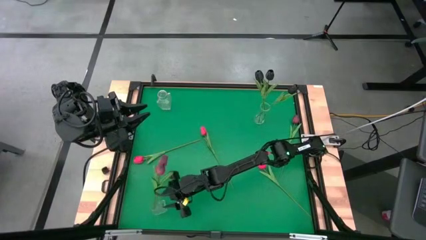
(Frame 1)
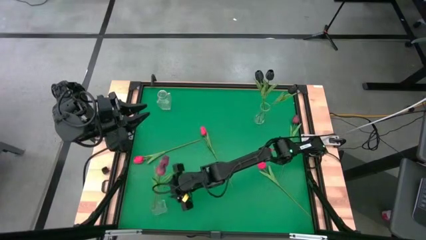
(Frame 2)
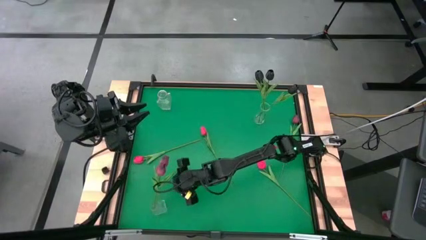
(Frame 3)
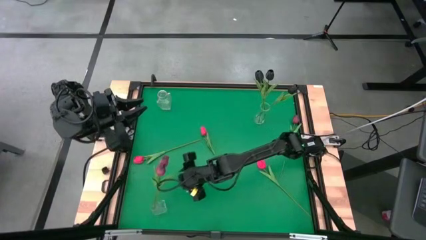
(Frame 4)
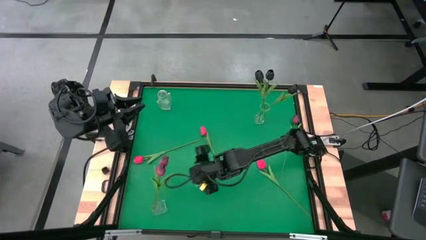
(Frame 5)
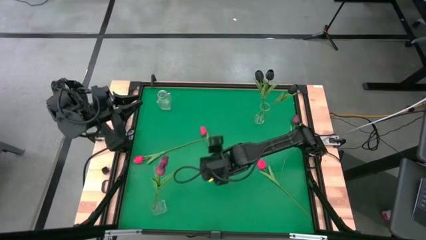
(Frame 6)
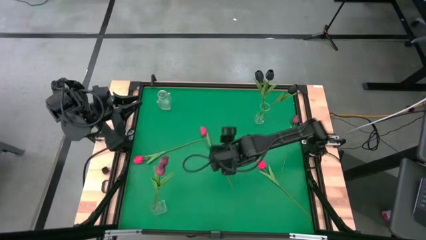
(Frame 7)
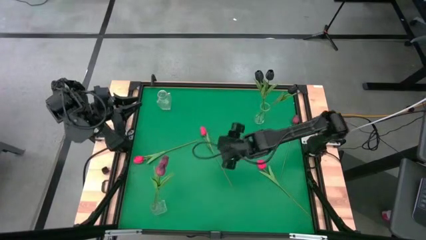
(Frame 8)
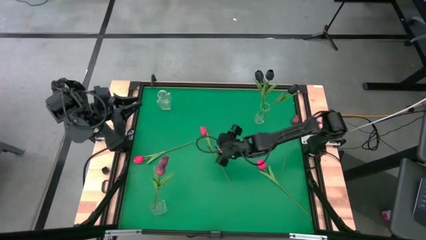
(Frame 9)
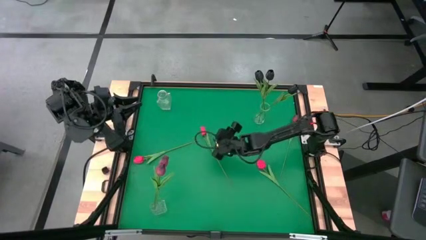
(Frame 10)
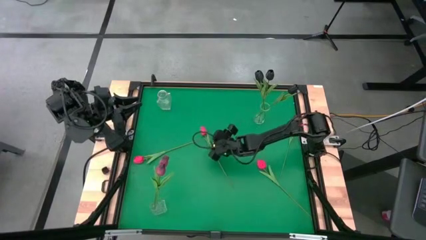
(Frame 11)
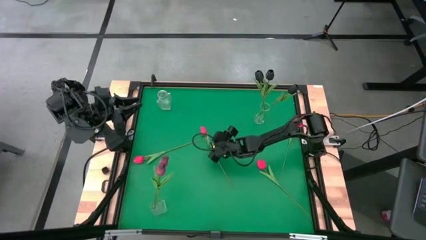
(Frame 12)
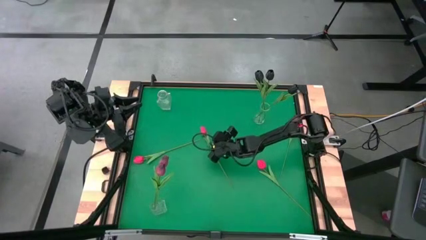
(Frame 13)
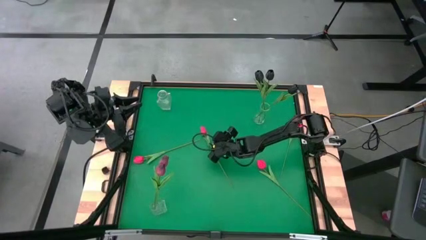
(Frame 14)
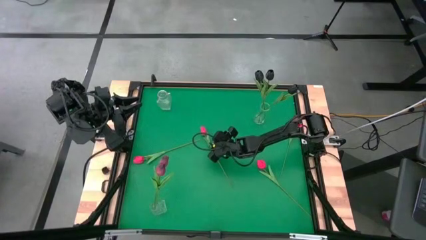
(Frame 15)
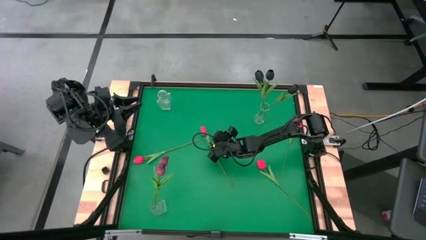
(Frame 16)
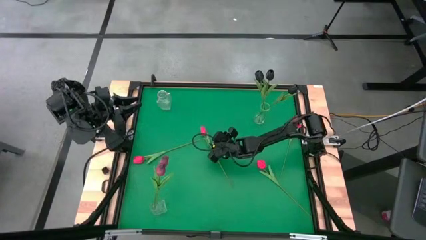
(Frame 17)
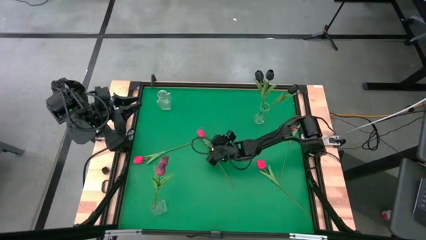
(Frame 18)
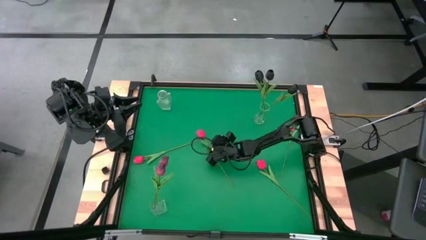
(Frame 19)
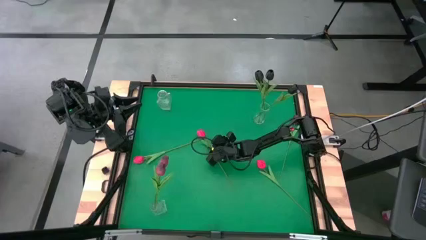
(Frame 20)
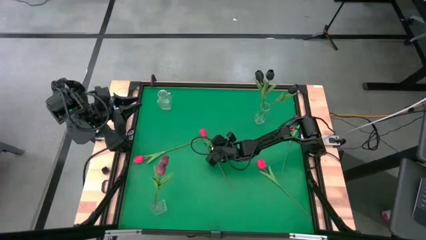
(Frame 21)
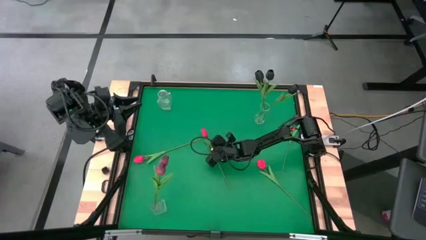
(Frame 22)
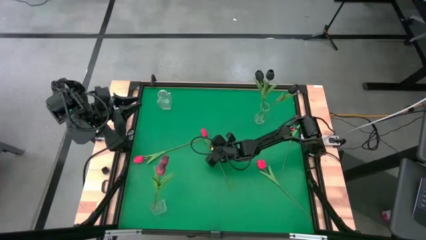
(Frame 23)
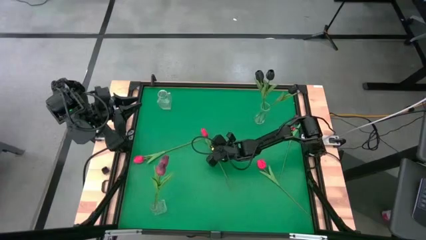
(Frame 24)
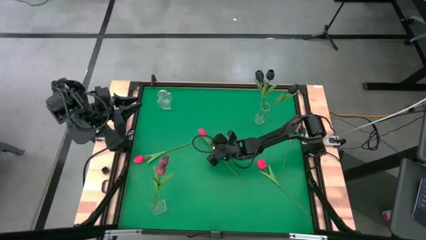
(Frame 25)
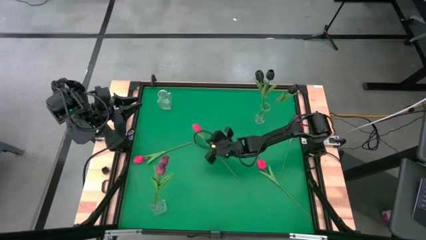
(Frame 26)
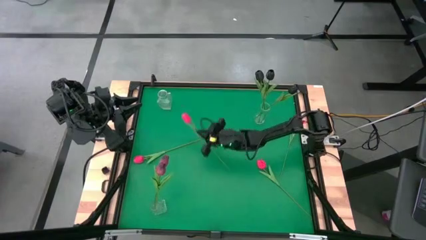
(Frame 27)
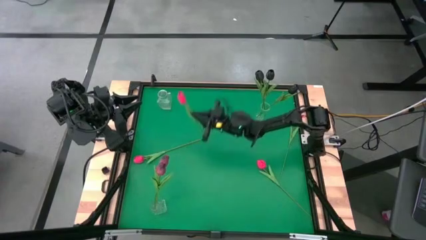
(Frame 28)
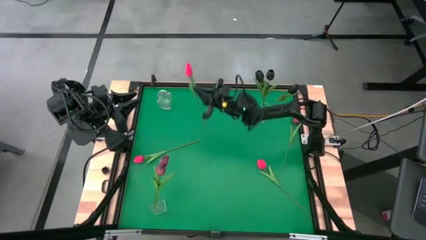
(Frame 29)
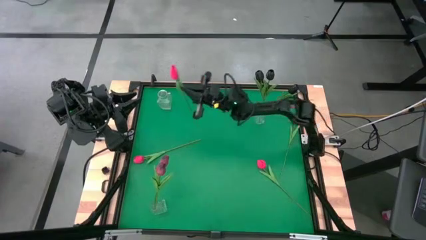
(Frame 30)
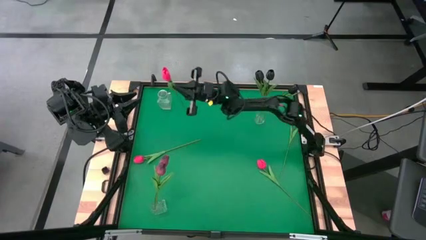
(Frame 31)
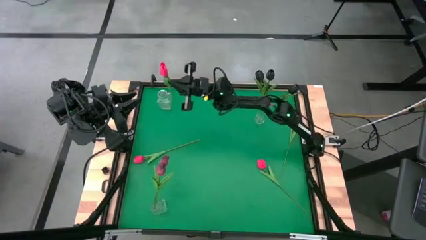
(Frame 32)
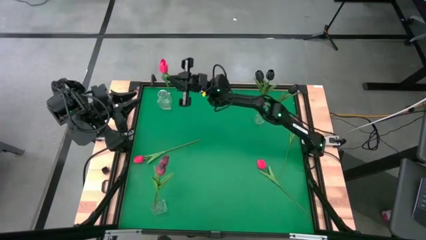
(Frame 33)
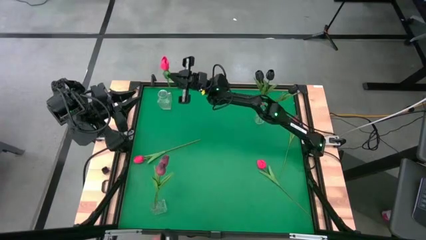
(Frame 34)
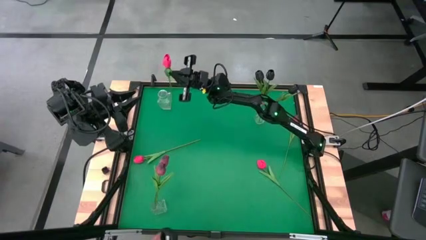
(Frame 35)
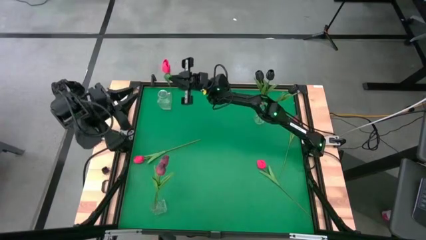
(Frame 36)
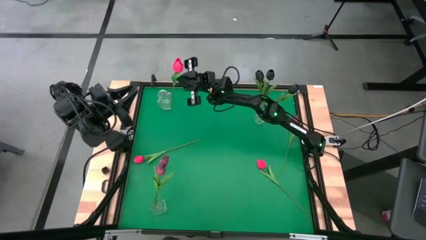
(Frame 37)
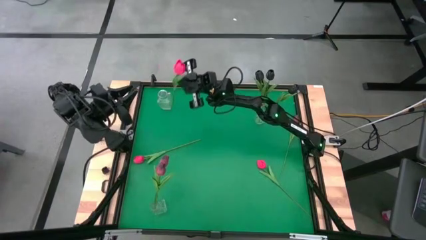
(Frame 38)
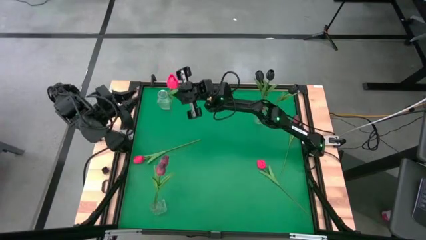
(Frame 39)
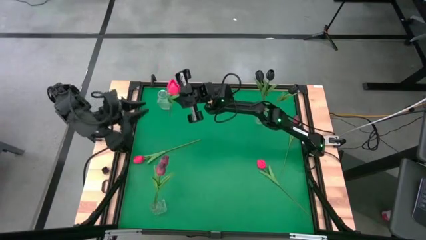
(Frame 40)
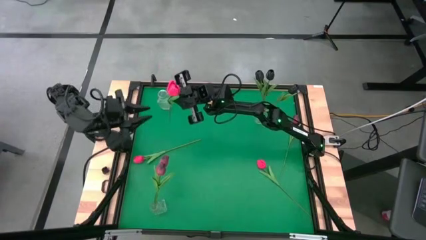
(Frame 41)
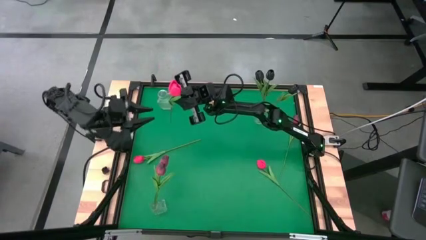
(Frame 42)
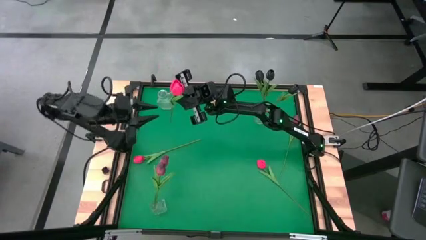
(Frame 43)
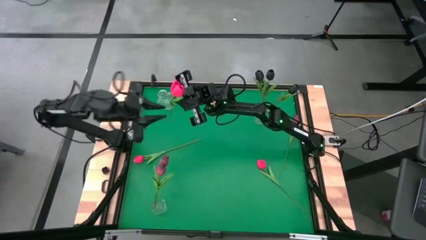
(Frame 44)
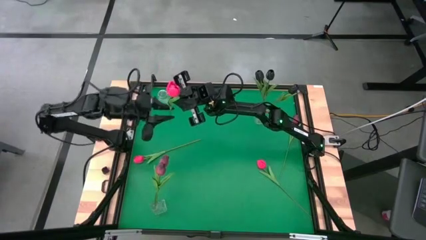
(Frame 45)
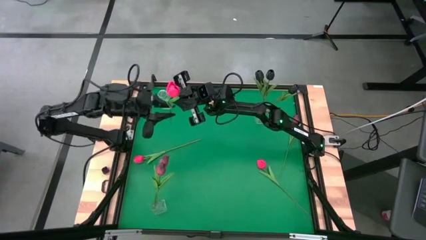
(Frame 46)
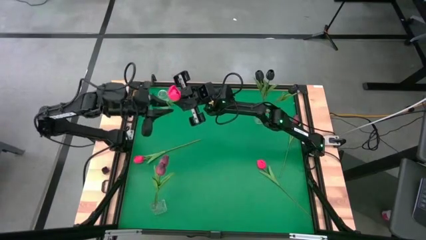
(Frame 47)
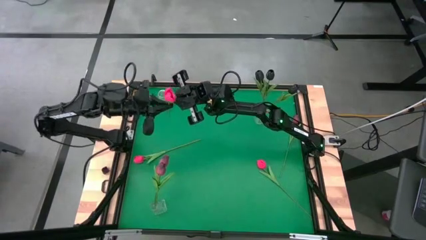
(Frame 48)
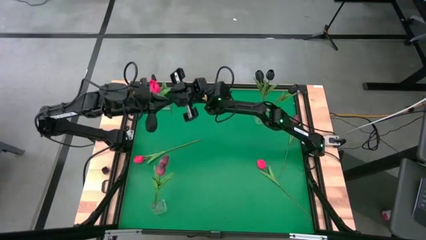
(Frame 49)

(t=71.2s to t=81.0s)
Task: Sort flowers into vase by color
Put the right pink flower into the top left transparent vase

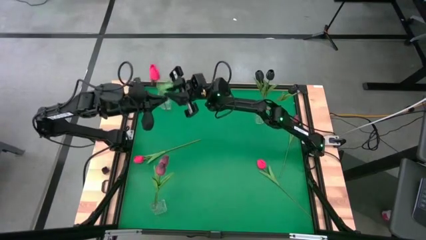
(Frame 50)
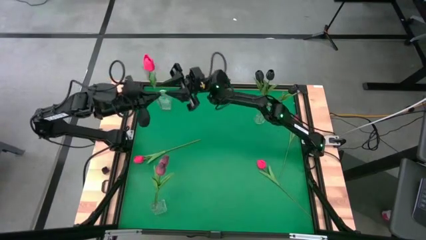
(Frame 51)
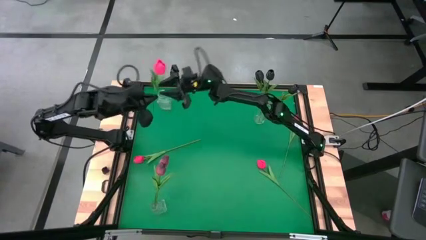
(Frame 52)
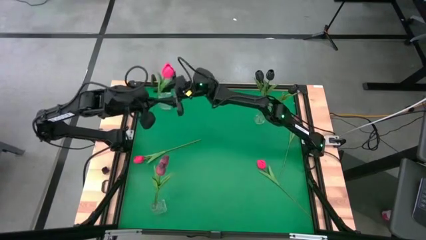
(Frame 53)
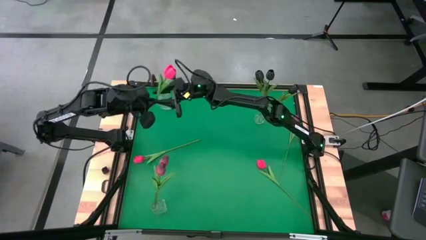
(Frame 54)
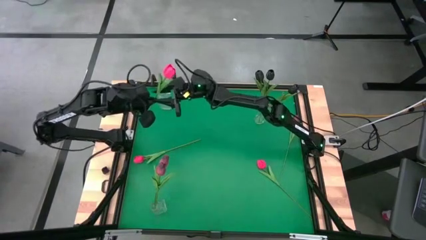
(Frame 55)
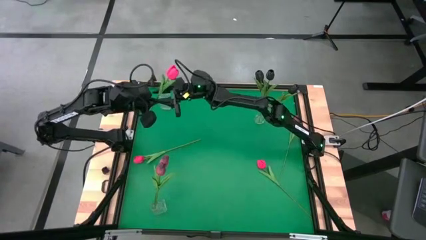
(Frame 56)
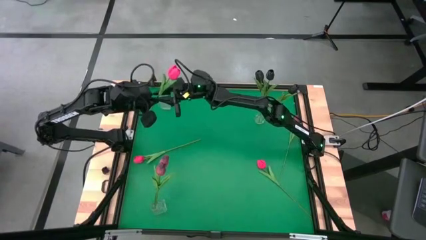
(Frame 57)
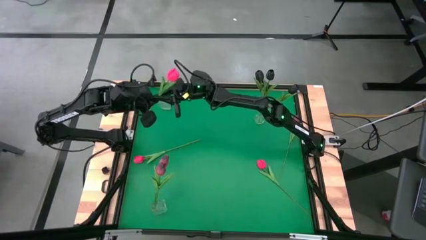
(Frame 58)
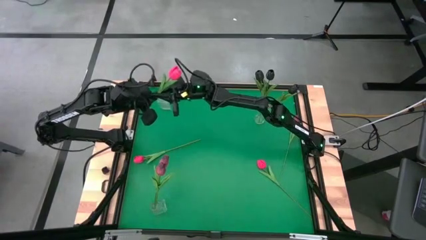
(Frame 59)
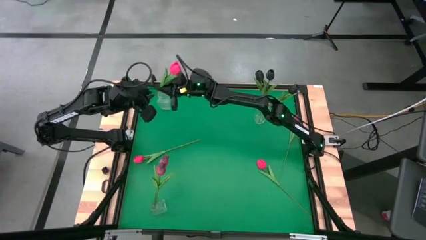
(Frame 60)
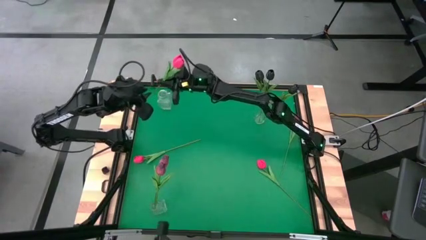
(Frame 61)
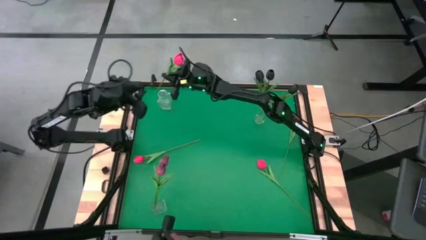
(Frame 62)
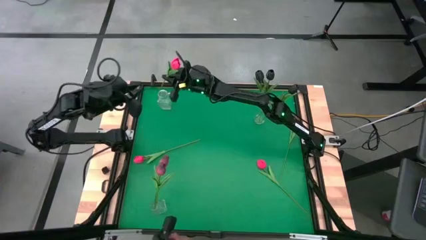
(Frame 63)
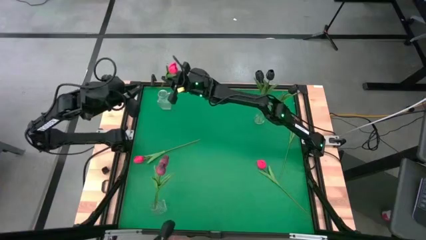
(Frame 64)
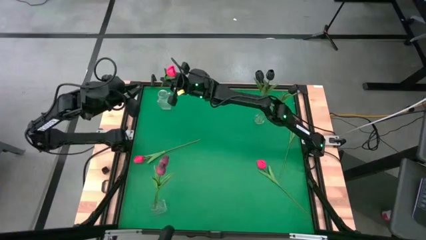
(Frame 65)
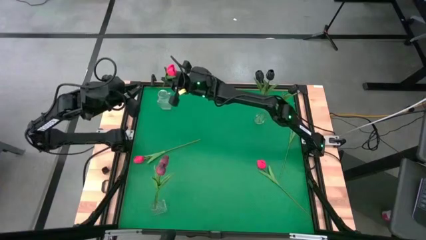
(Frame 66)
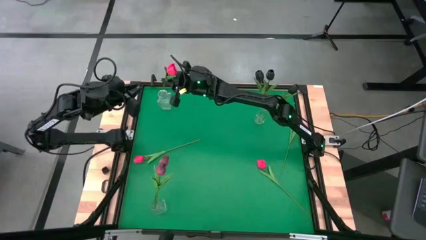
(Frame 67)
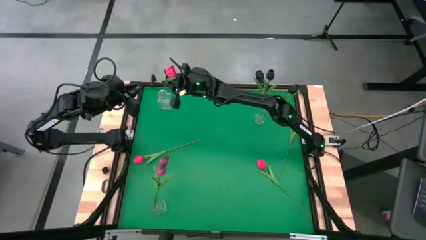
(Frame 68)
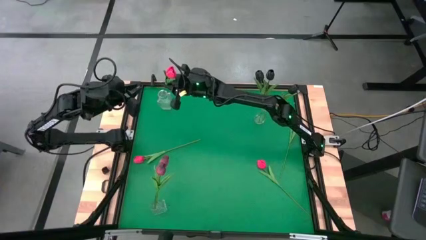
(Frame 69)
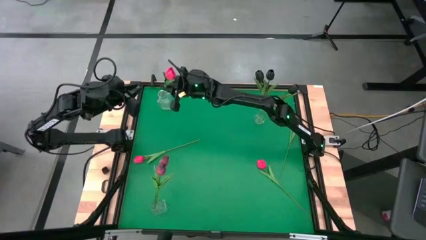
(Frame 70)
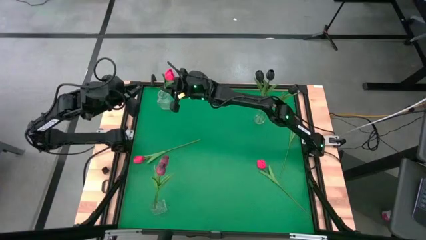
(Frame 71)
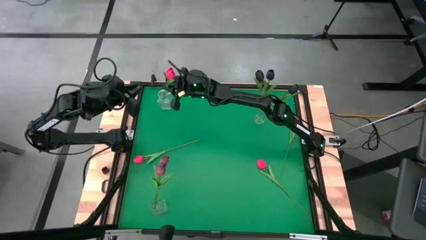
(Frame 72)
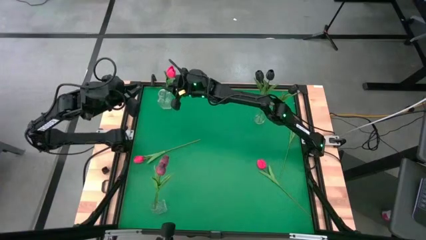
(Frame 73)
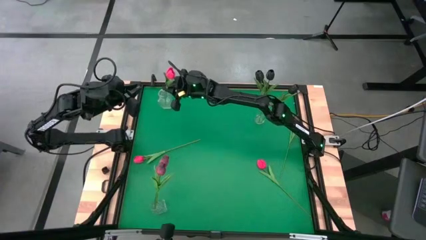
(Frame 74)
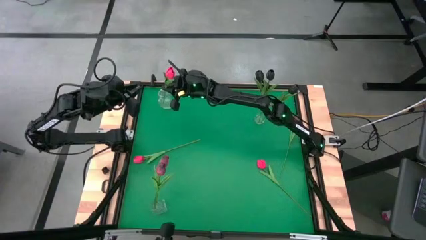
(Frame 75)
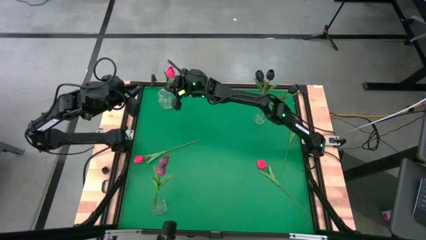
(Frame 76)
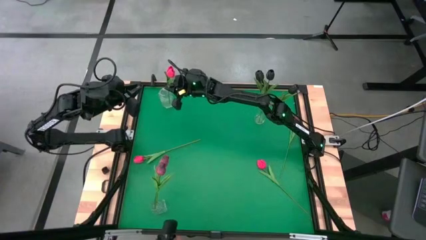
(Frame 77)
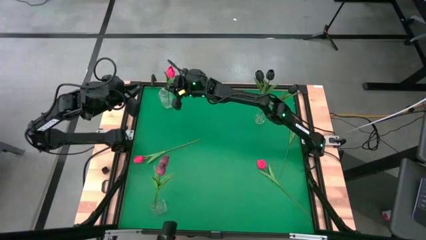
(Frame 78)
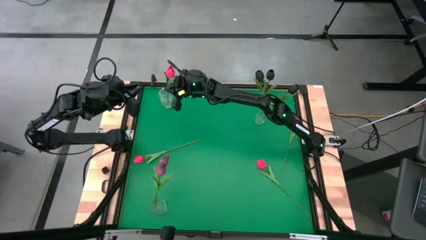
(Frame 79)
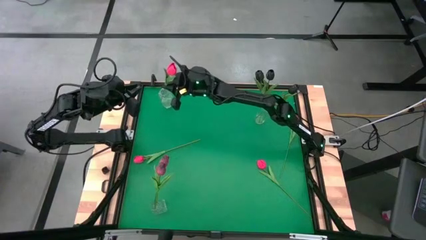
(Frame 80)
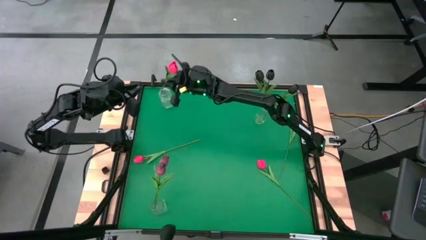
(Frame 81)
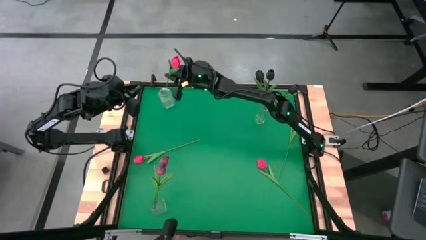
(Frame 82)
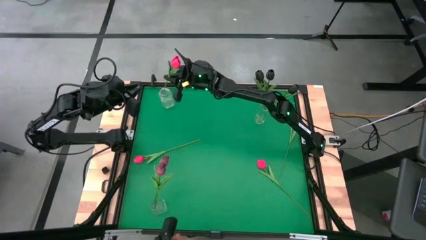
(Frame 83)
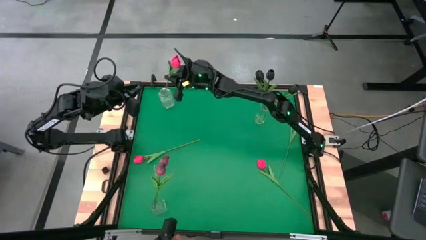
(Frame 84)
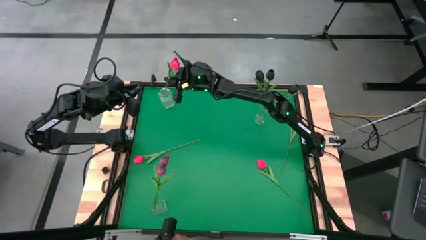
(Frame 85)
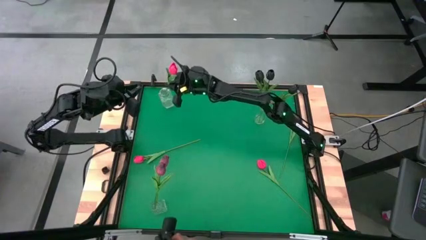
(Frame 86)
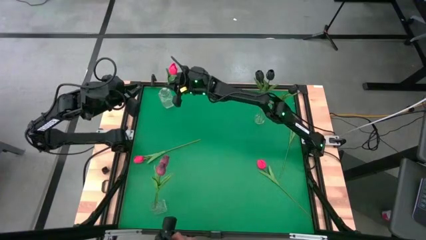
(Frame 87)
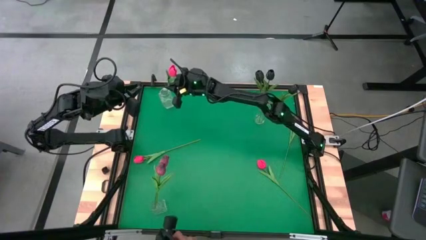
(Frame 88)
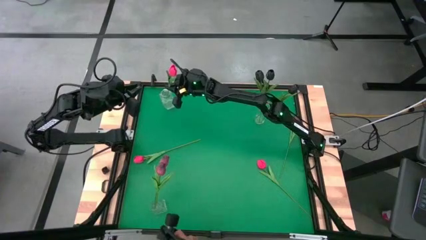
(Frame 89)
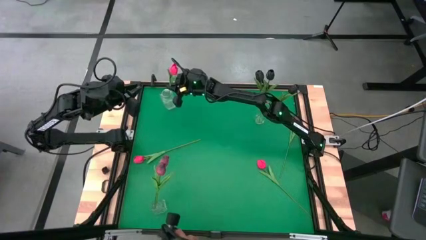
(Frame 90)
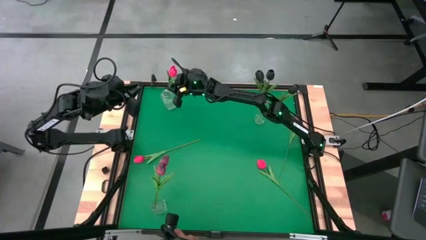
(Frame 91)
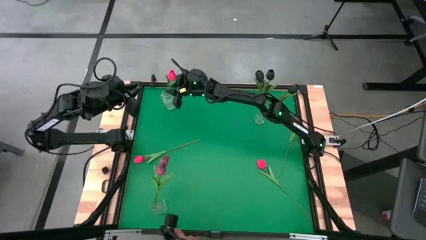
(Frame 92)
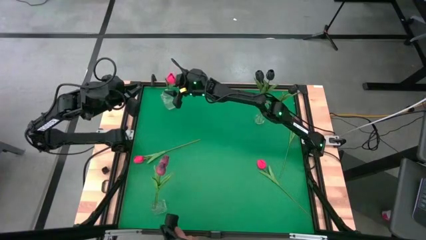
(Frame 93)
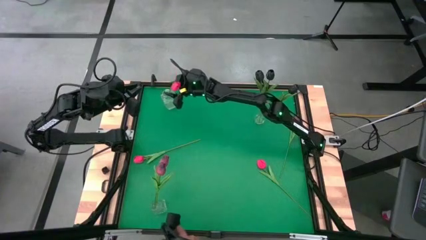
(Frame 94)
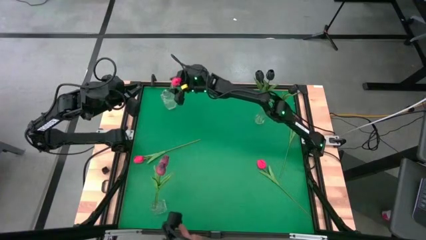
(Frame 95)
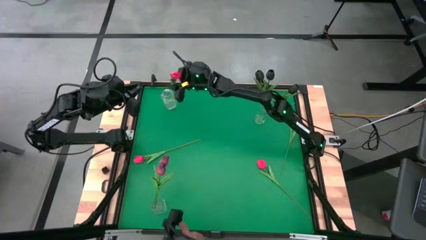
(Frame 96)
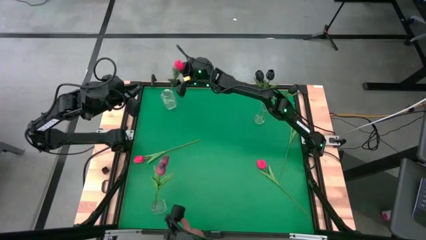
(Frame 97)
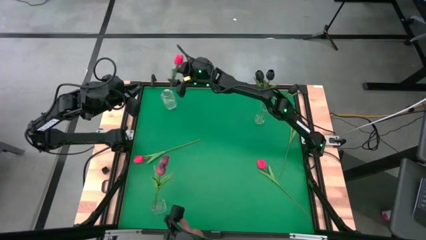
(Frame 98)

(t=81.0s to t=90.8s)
Put the right pink flower into the top left transparent vase
